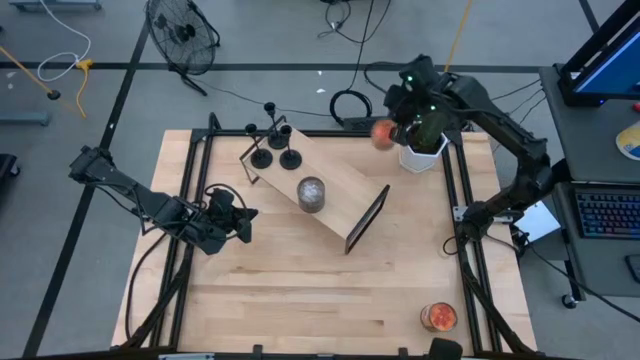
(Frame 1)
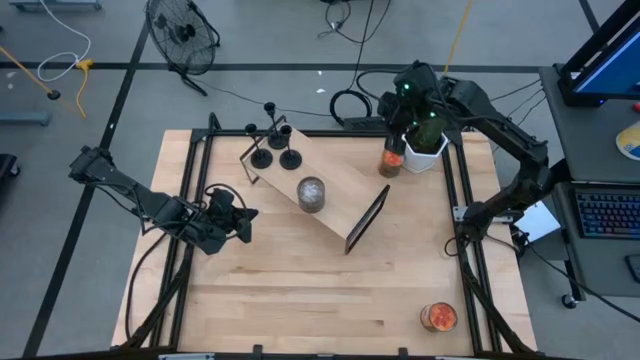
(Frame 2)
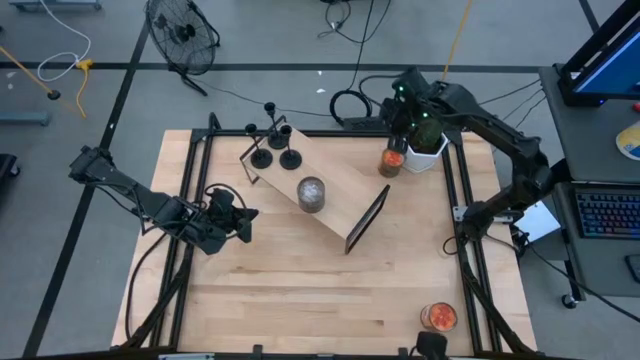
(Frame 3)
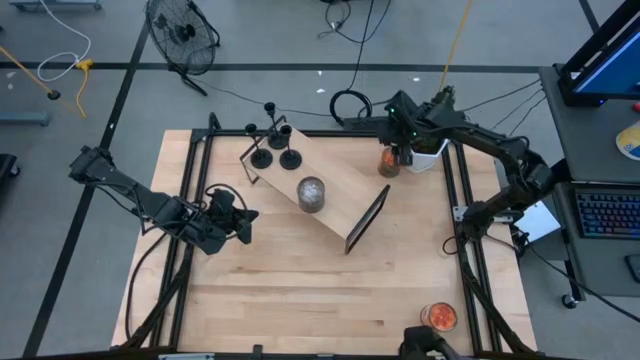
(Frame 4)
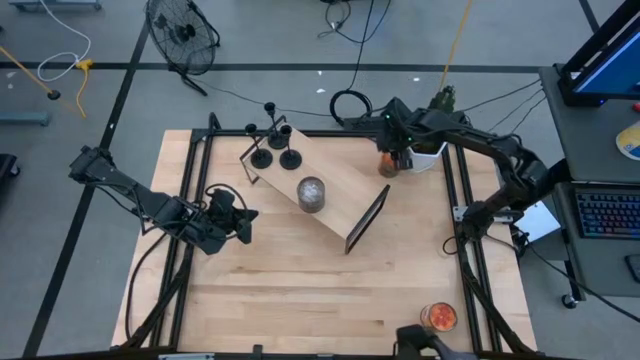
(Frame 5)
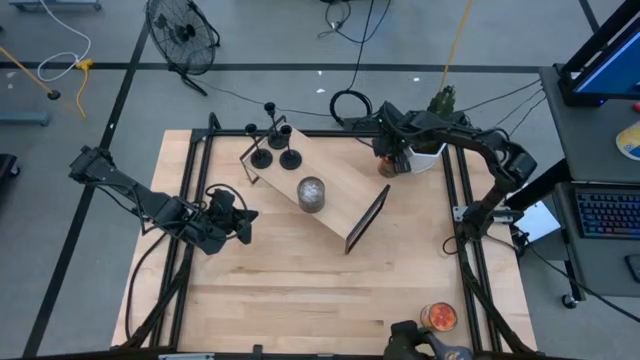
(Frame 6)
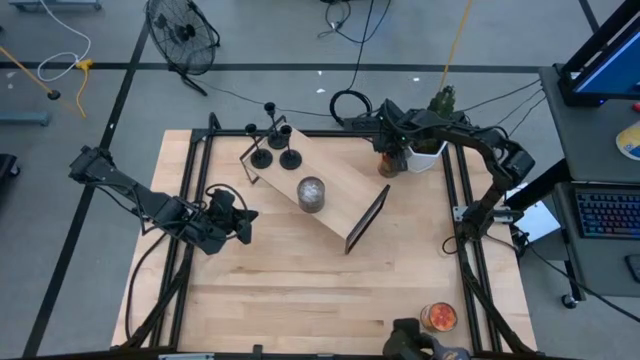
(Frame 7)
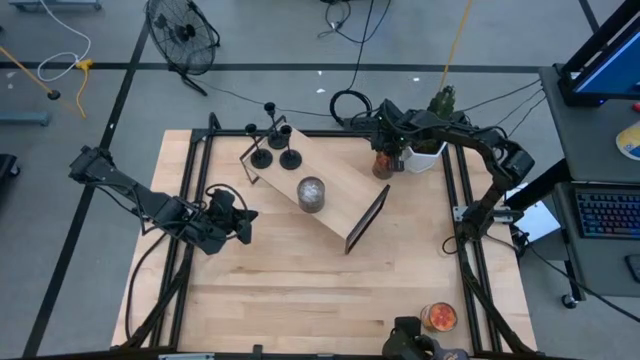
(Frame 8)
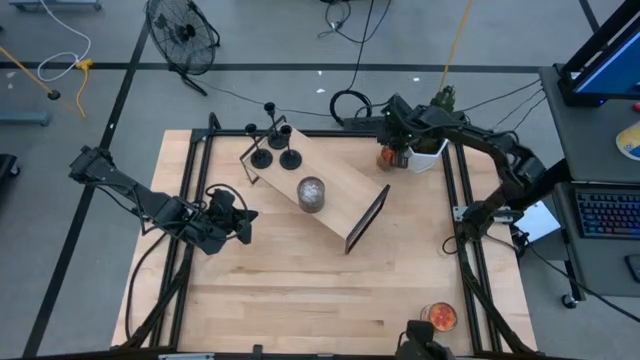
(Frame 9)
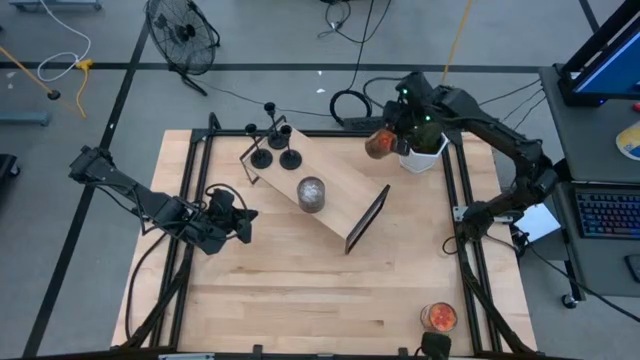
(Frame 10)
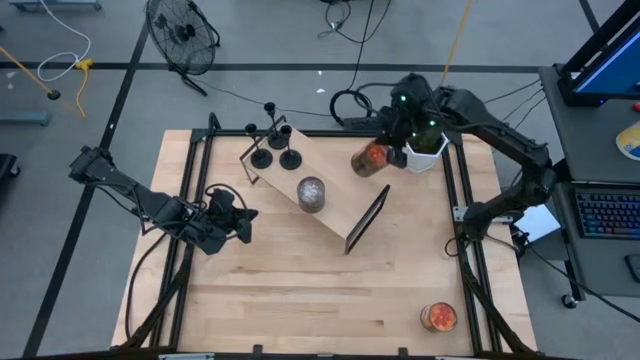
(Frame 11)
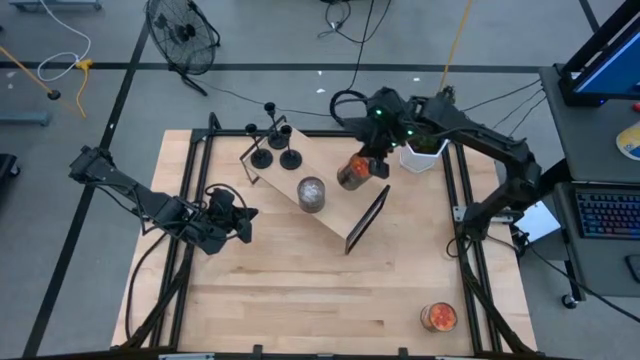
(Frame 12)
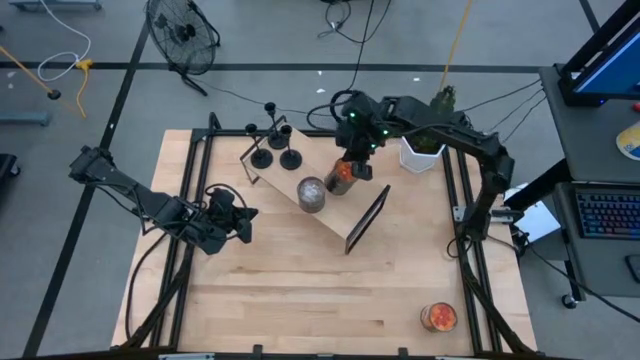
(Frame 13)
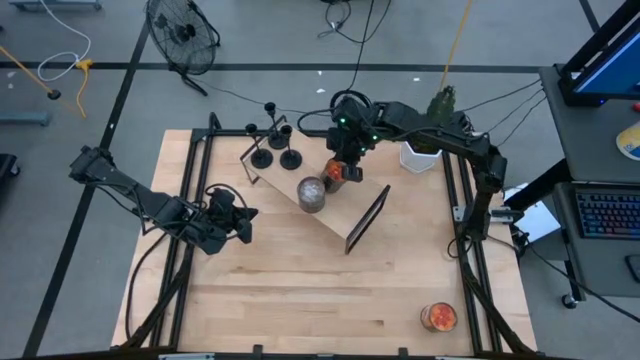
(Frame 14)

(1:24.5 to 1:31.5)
Task: Pick & Place candle stick holders
Put the top orange scented candle aligned with the brown scented candle on the shelf

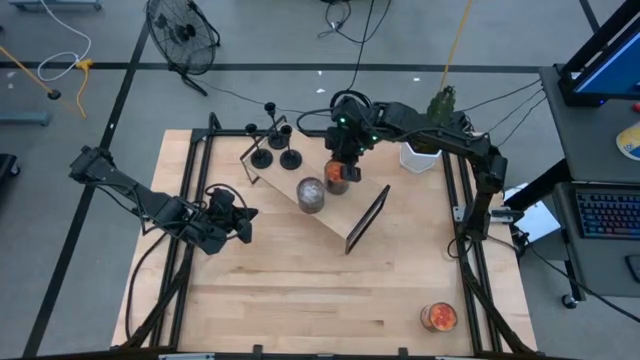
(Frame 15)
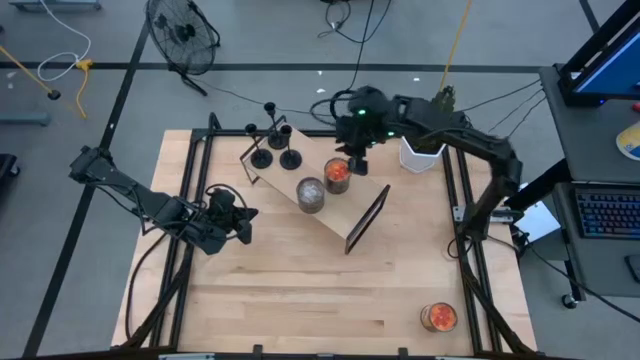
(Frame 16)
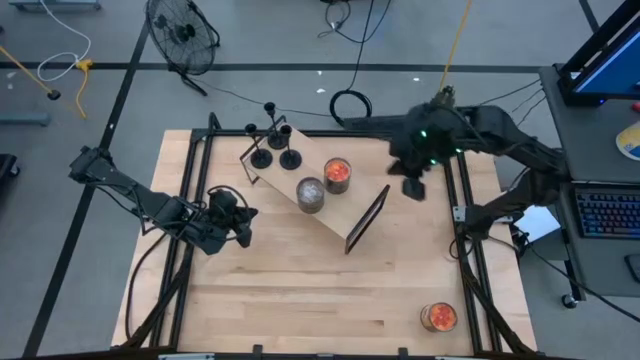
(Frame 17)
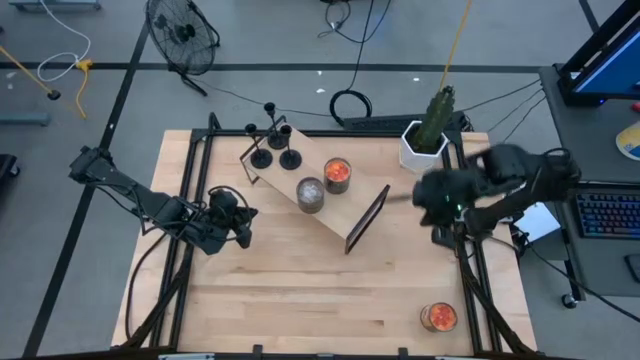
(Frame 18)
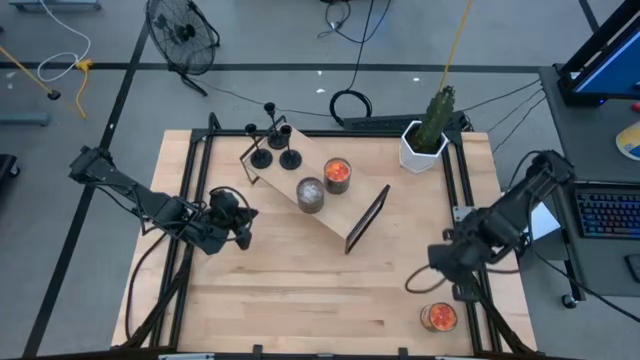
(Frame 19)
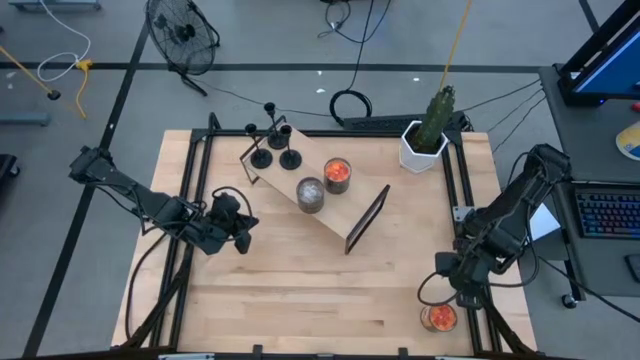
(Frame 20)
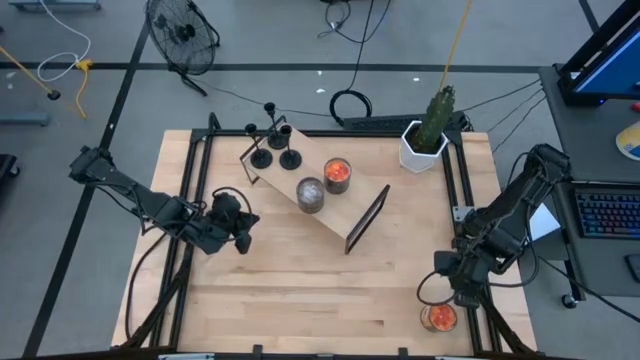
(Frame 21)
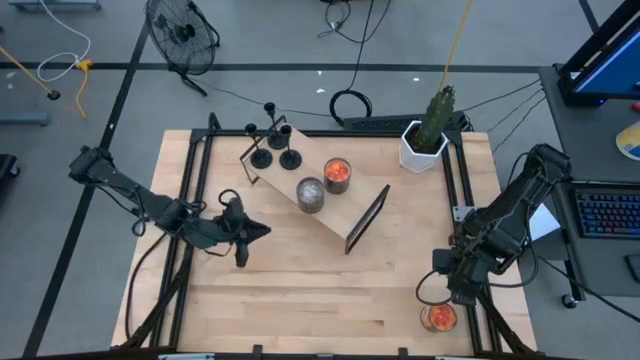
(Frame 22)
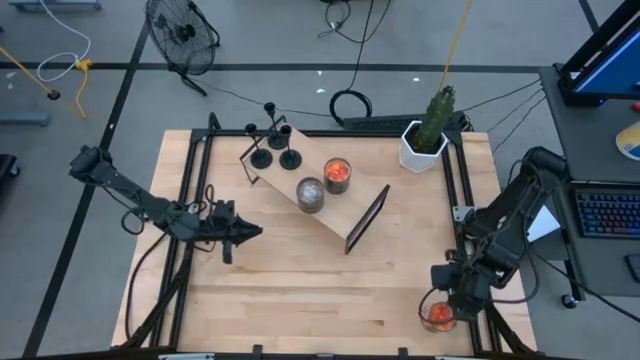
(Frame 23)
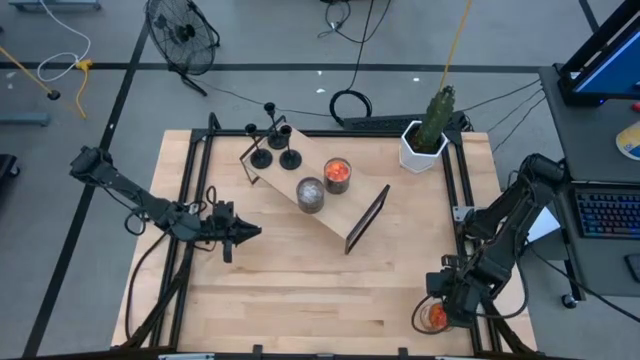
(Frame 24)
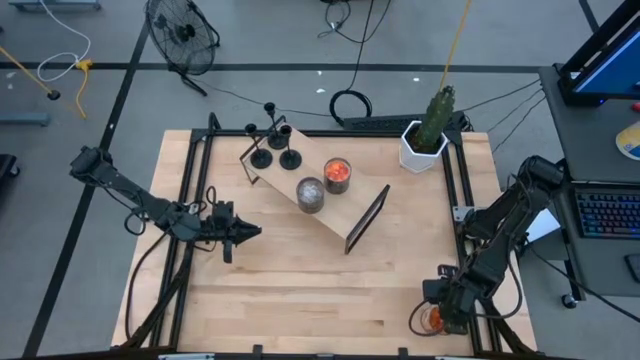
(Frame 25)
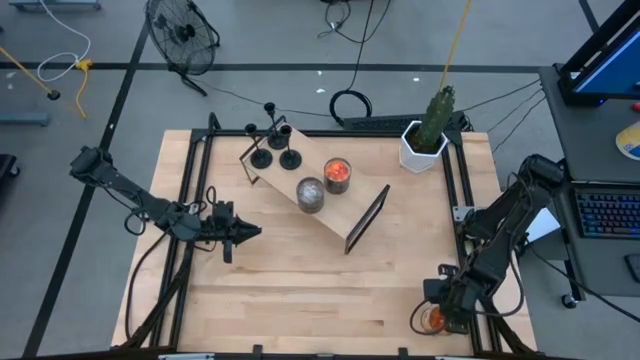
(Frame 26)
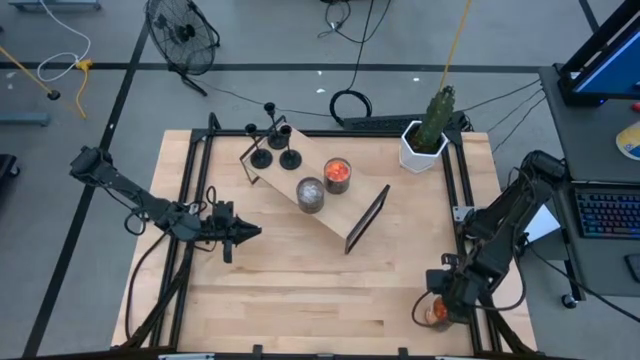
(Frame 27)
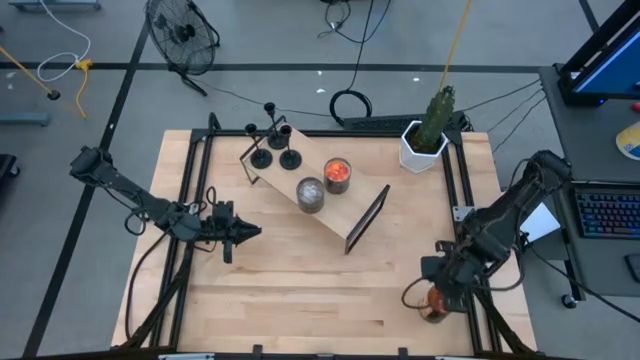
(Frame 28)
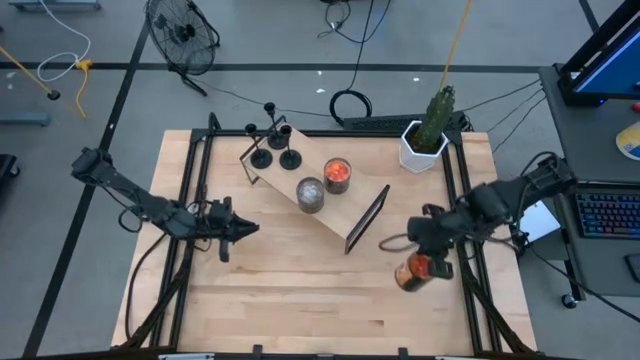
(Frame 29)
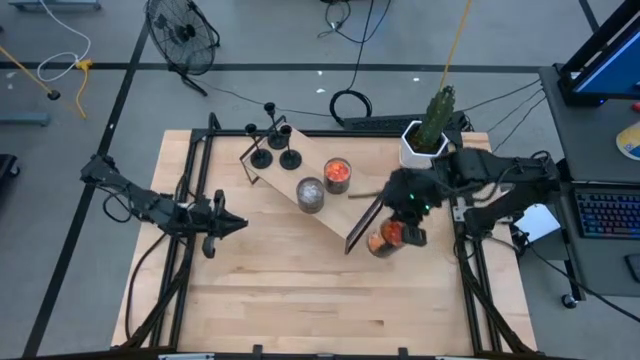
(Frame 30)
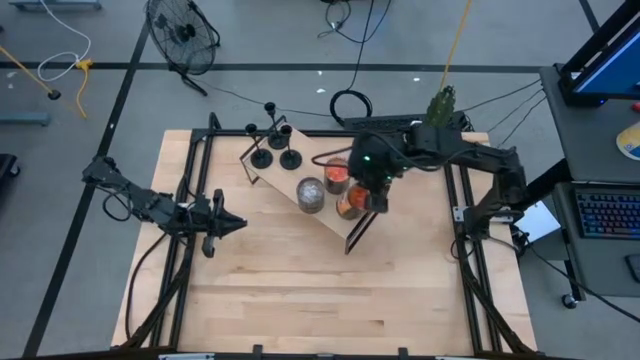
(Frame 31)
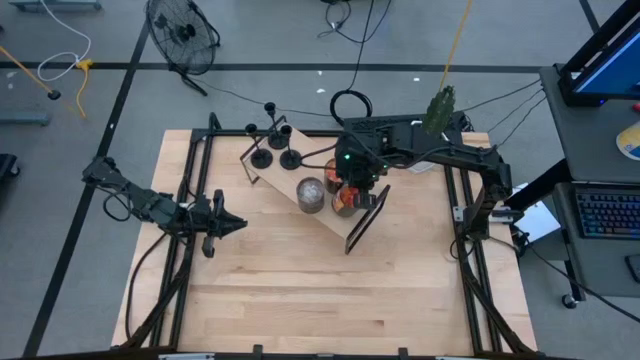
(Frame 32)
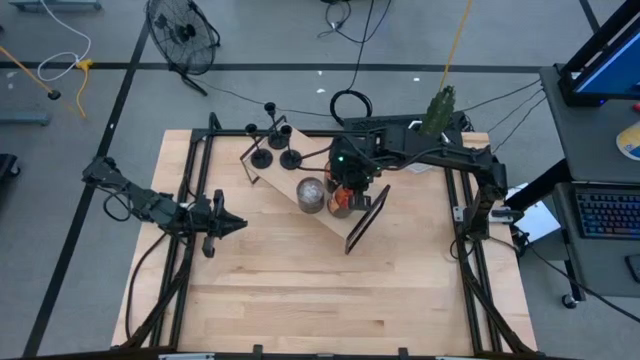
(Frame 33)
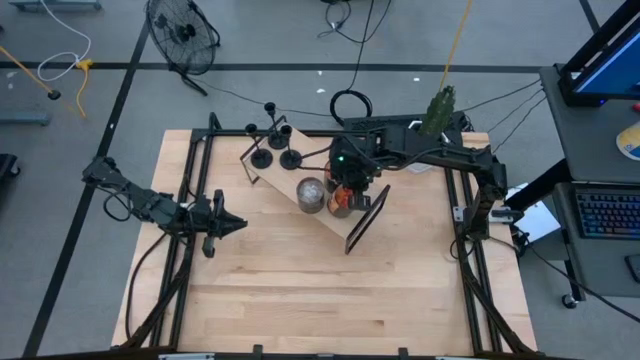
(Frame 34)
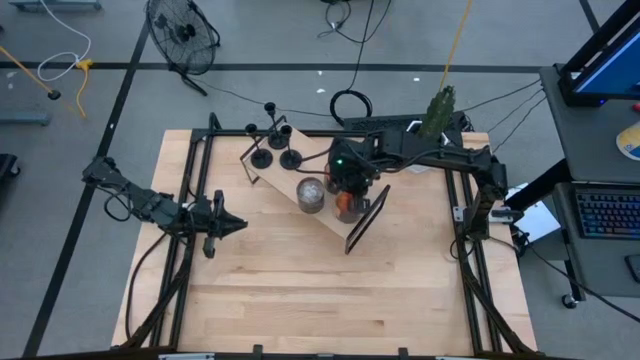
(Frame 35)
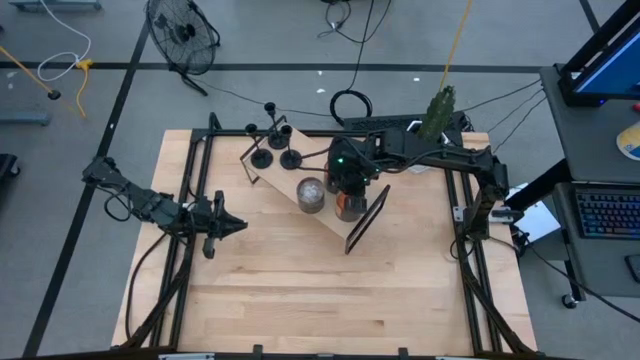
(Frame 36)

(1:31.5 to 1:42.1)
Put the orange scented candle on the shelf

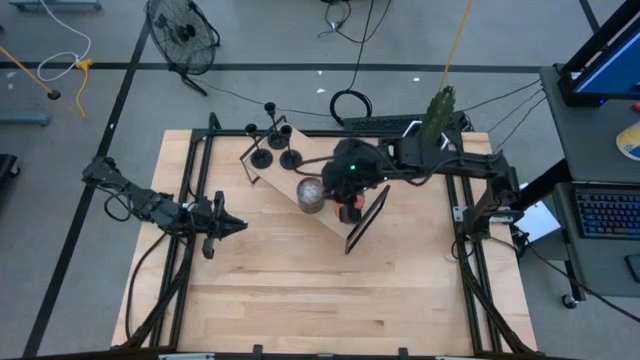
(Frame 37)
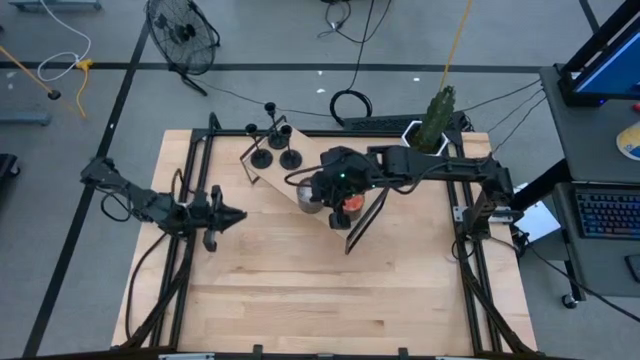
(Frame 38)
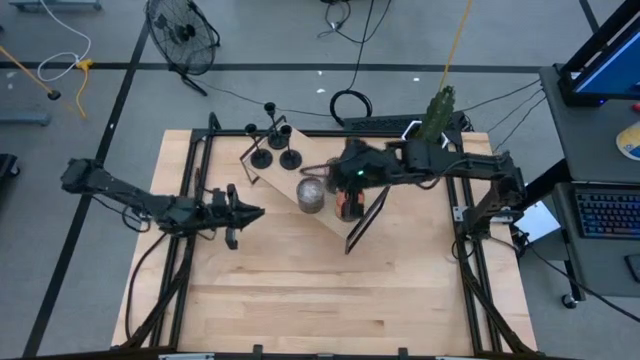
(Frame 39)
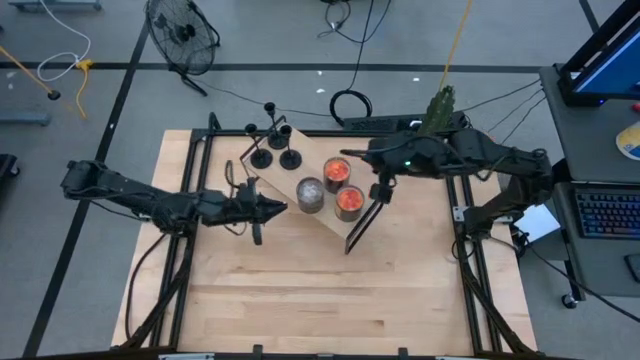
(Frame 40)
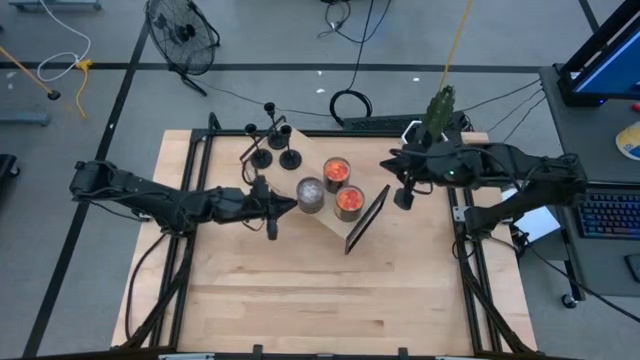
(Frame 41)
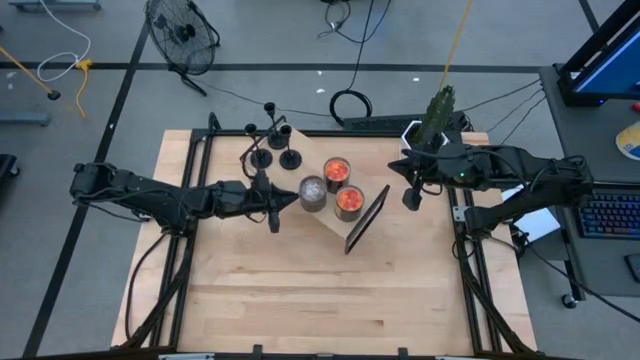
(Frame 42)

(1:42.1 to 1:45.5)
Adjust the brown scented candle on the shelf
